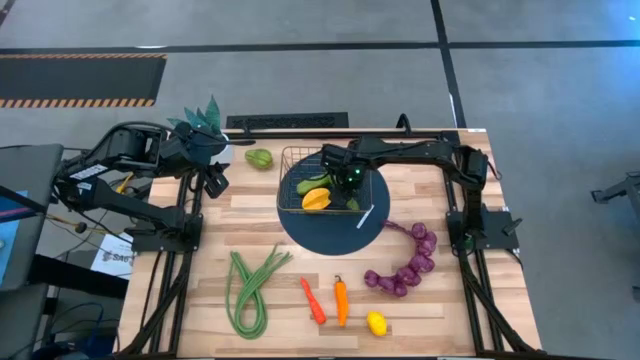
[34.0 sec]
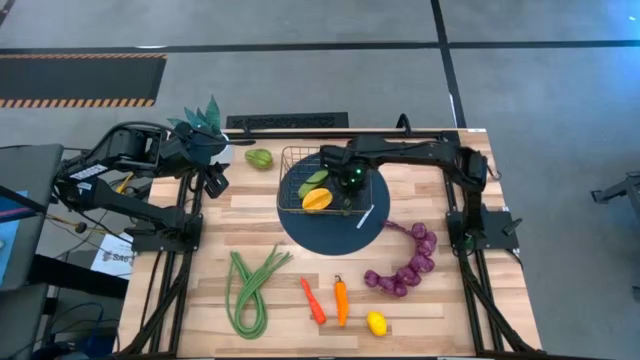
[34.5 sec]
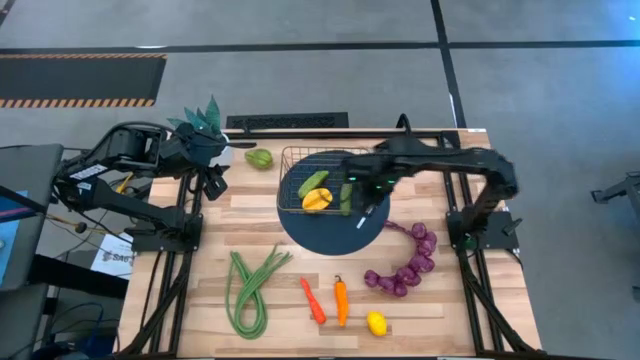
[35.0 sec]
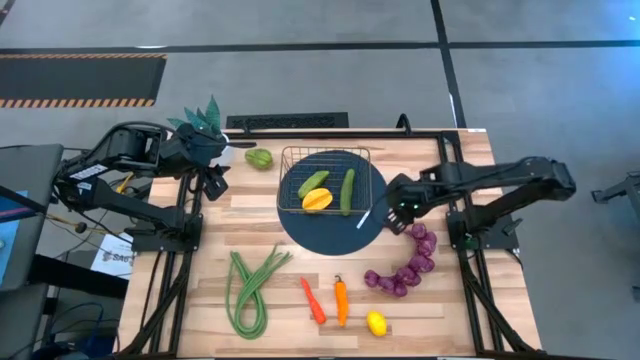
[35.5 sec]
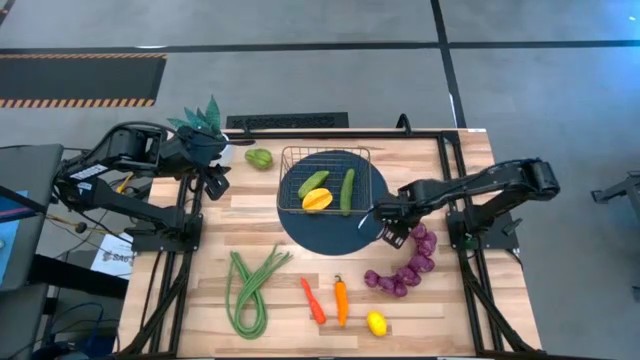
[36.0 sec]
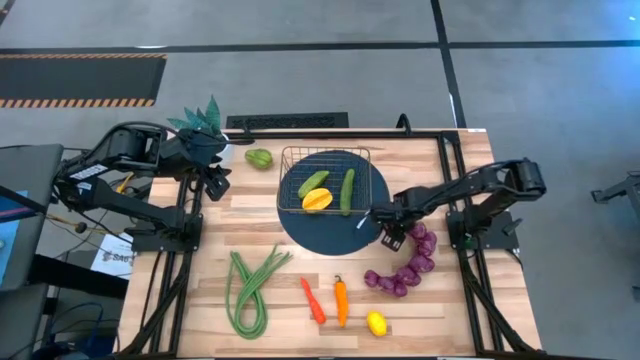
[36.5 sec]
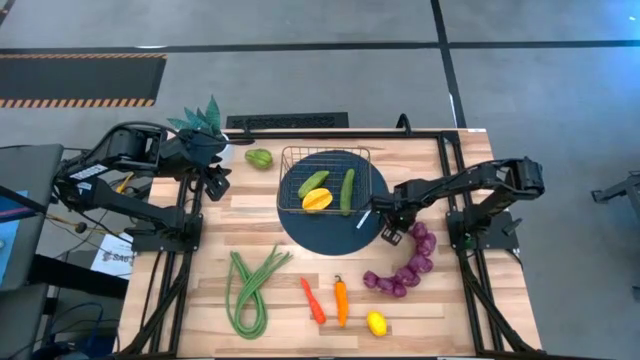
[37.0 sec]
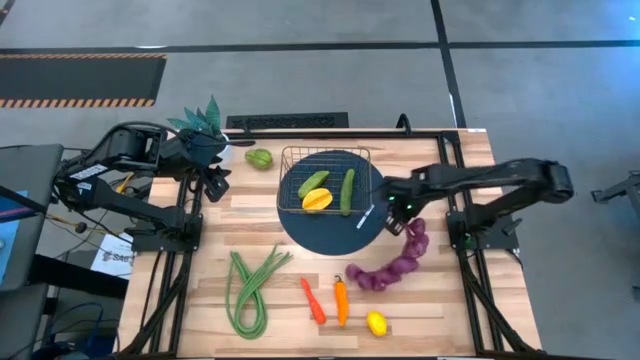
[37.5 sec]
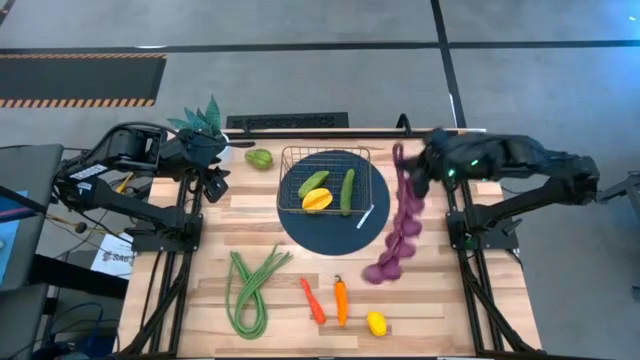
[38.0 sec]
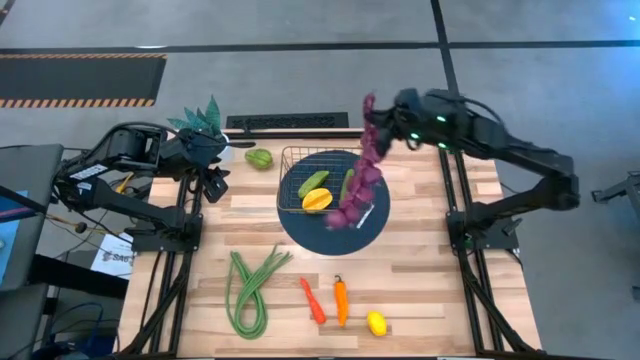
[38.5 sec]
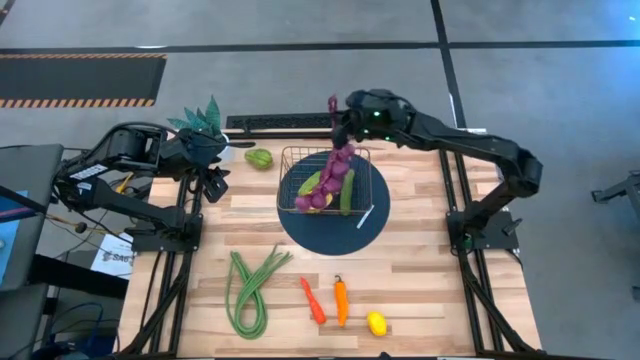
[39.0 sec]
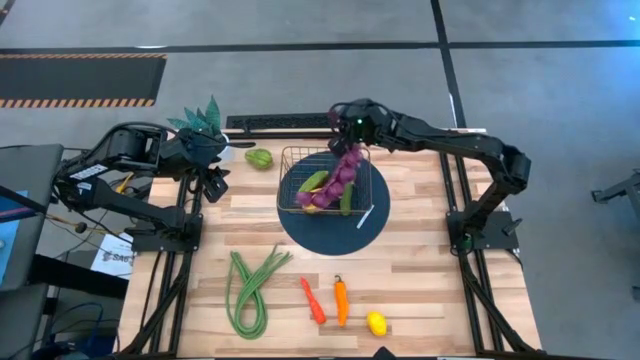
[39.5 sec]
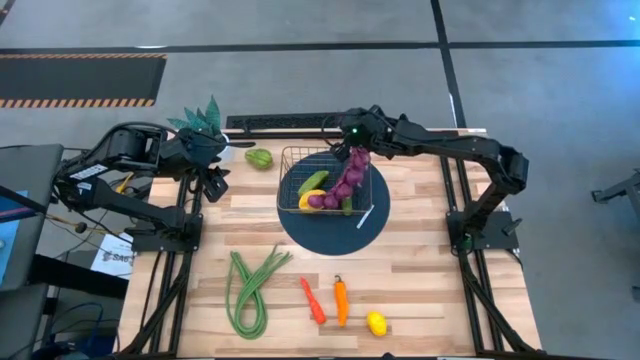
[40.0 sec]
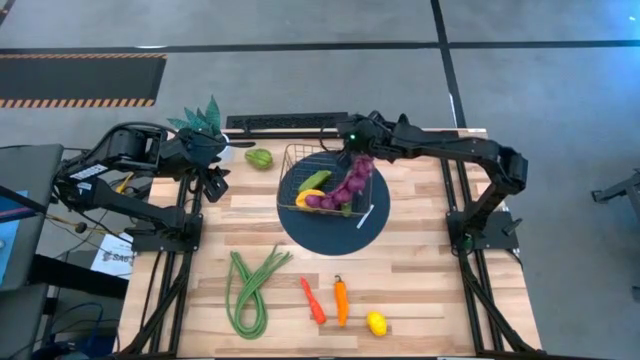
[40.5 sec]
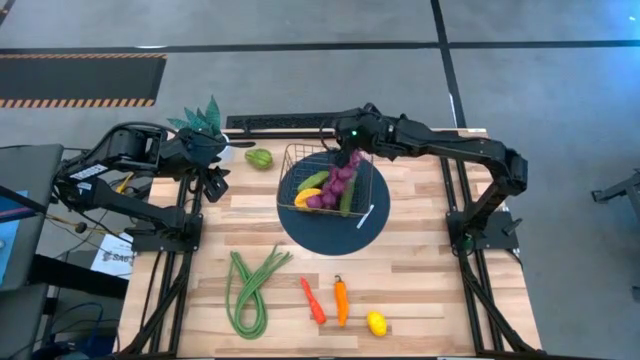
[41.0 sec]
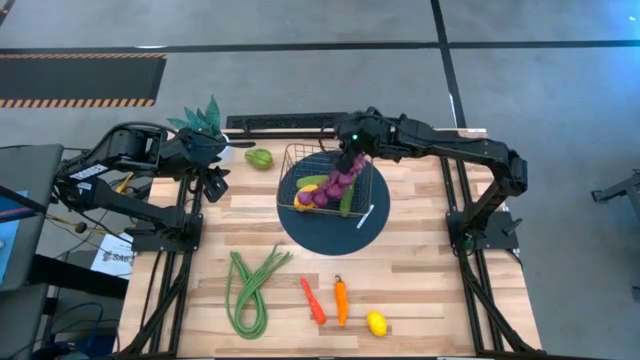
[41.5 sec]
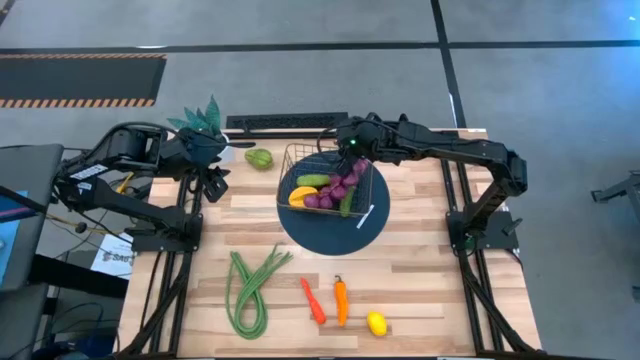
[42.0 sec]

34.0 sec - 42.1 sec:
Task: Build produce basket
Put the purple garlic into the wire basket

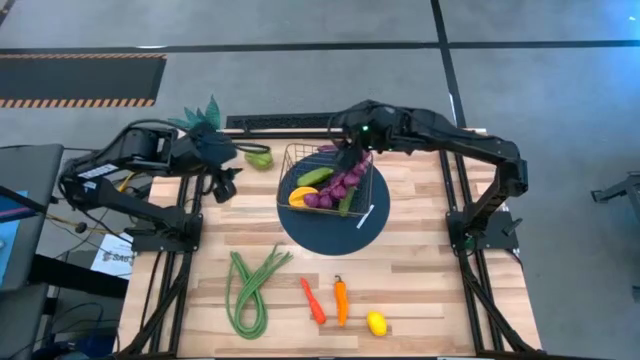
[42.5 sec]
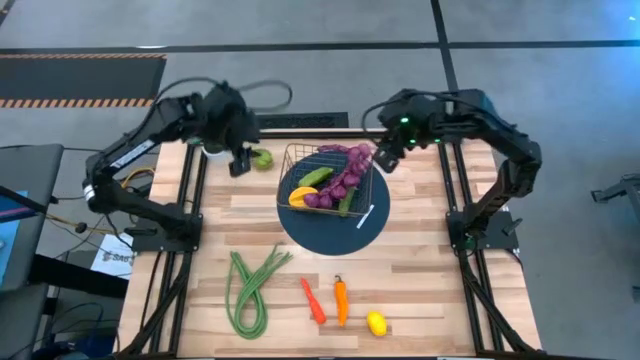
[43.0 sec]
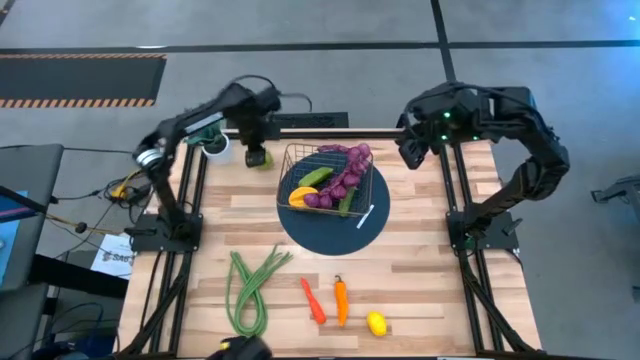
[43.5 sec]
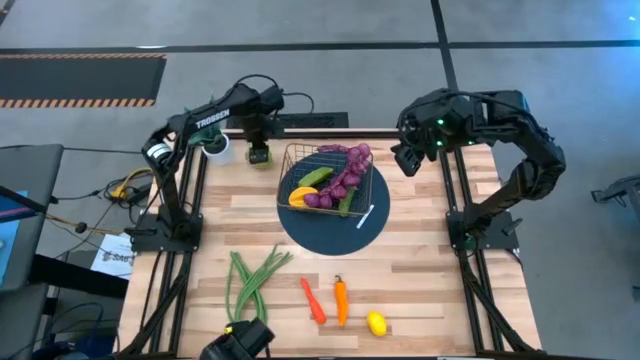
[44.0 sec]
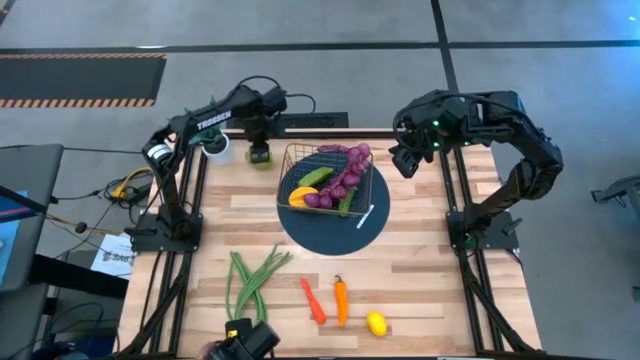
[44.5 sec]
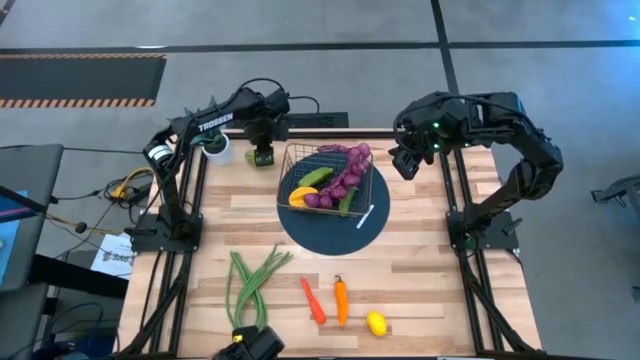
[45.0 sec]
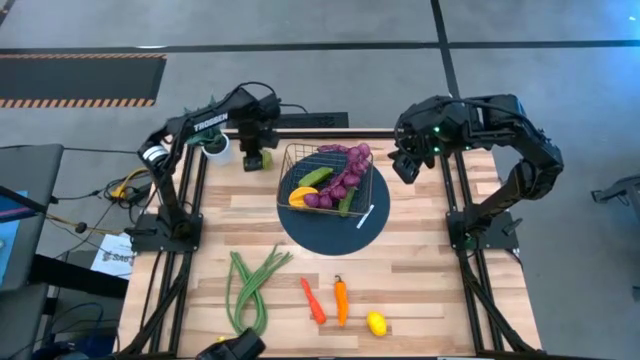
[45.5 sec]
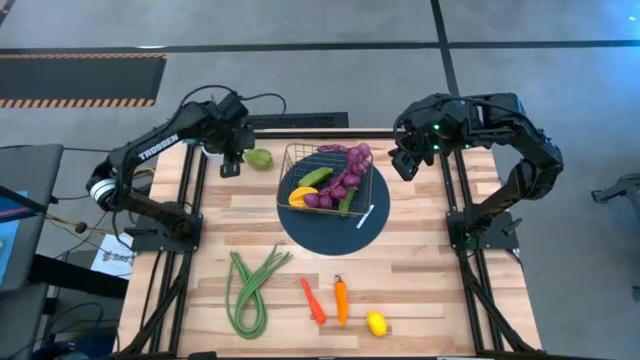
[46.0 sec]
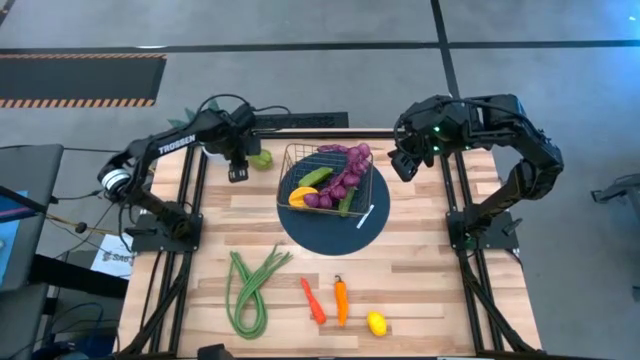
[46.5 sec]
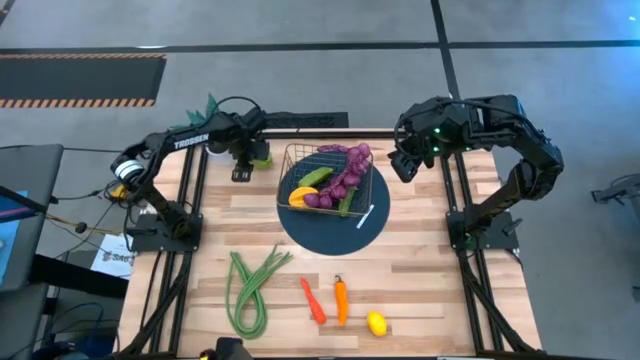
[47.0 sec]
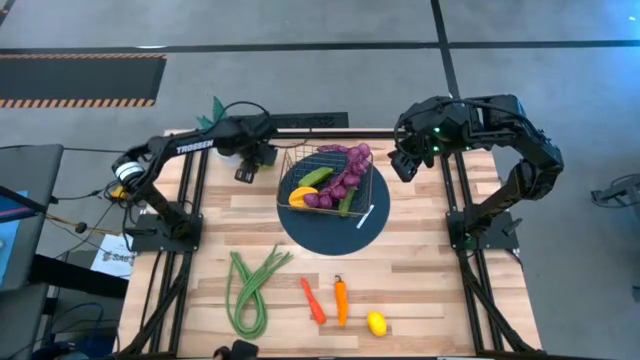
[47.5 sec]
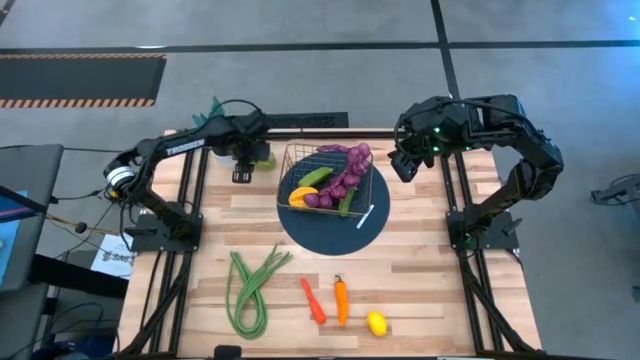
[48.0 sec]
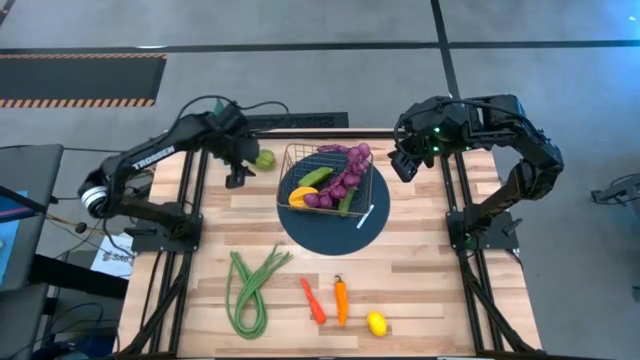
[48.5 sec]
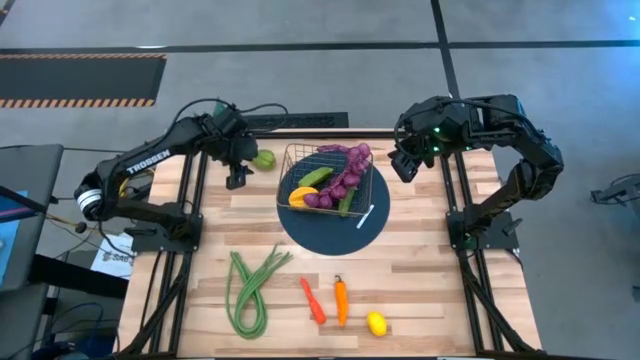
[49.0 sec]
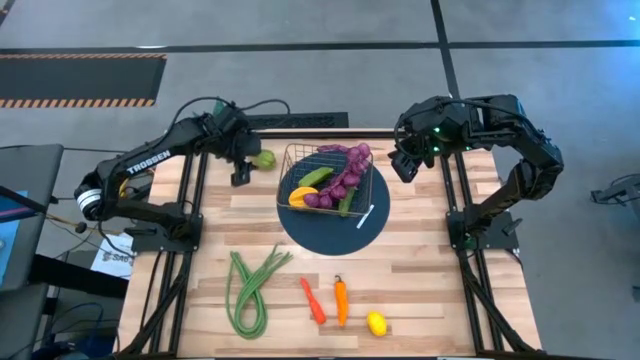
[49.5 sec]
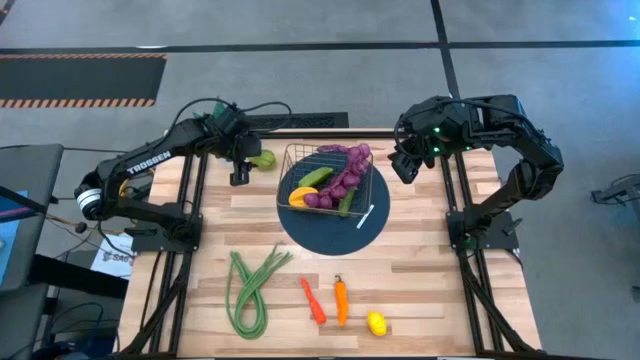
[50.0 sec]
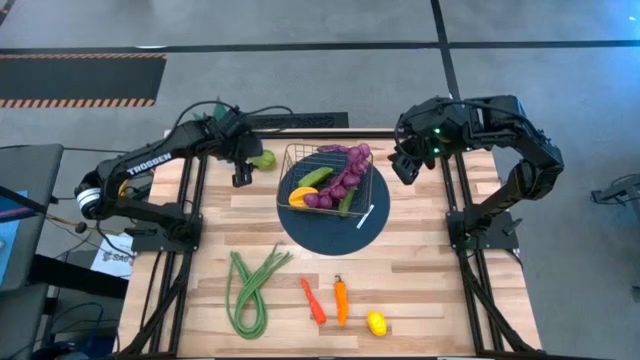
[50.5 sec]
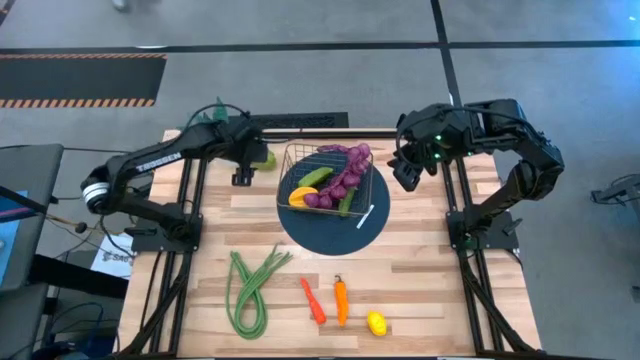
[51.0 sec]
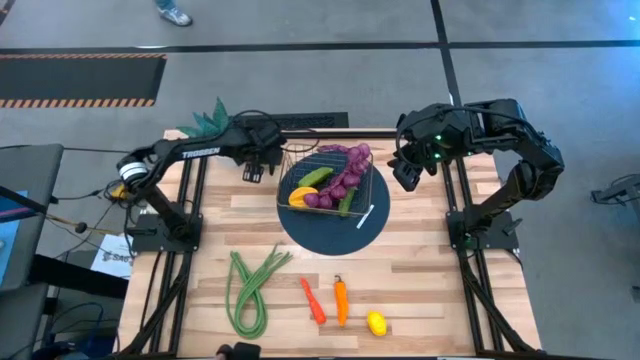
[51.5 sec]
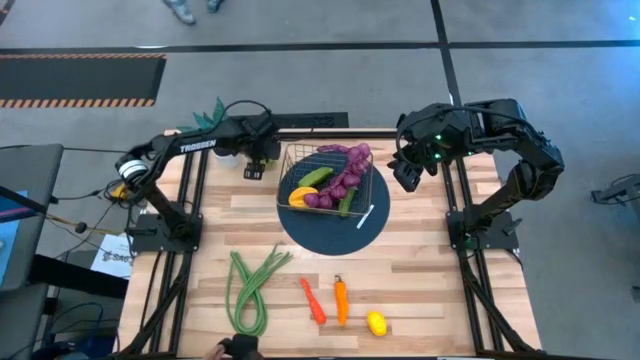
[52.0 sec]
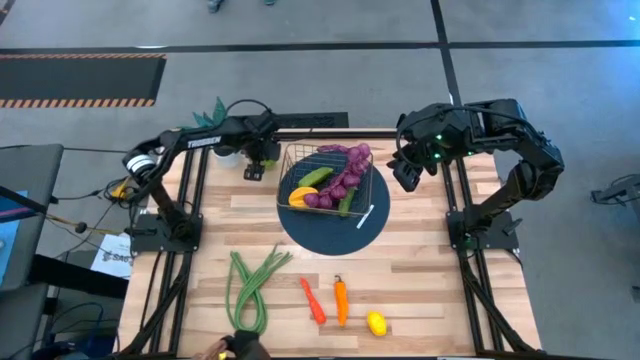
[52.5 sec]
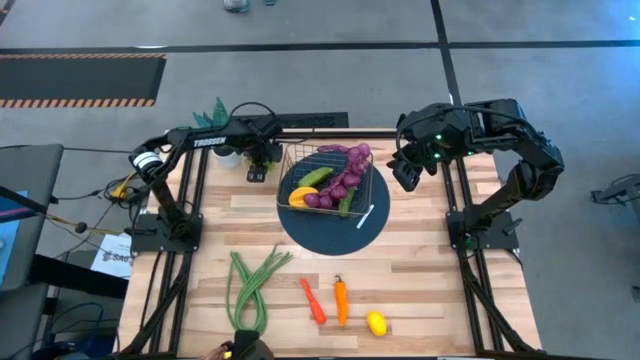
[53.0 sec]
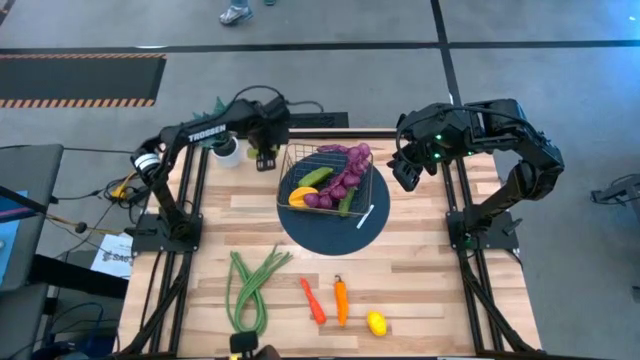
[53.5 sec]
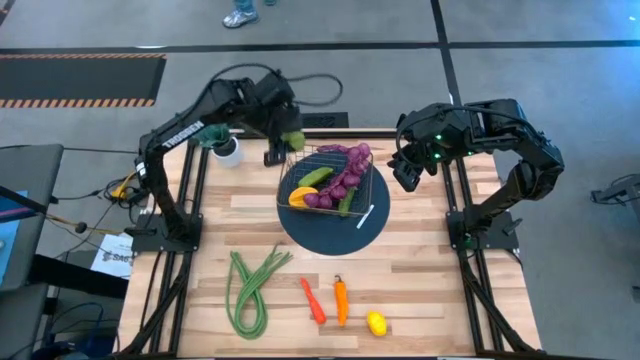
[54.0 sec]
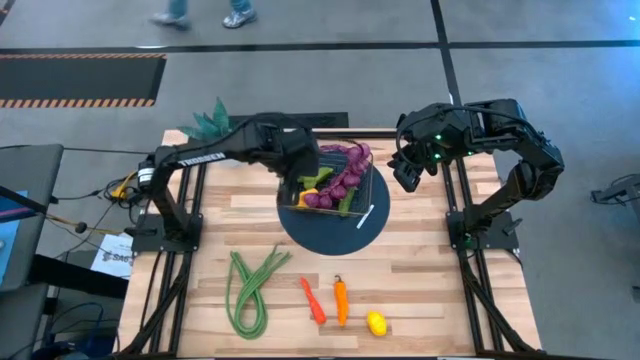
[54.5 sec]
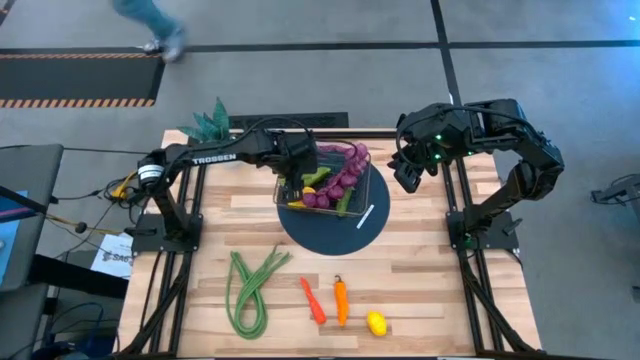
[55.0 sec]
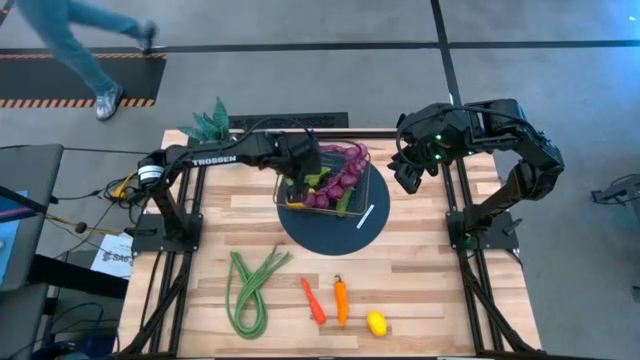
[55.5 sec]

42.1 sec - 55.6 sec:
Put the green chayote into the wire basket
